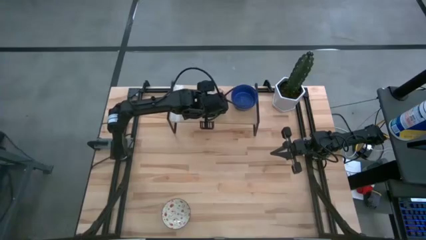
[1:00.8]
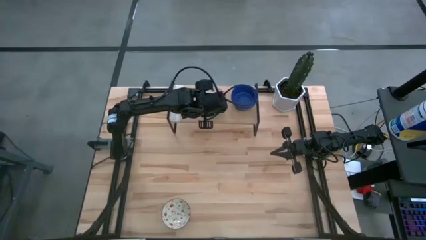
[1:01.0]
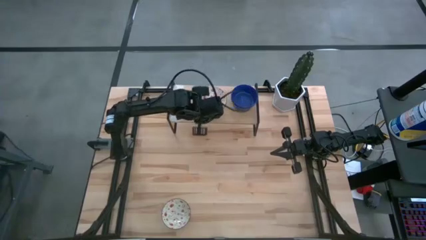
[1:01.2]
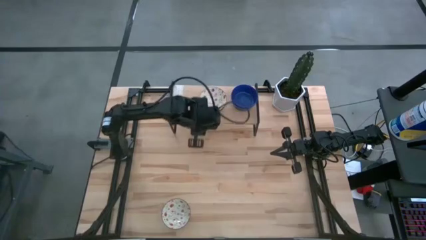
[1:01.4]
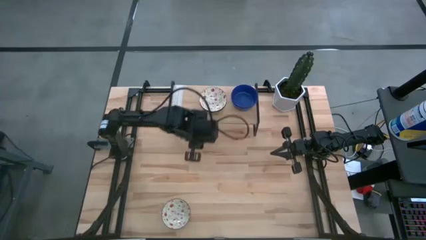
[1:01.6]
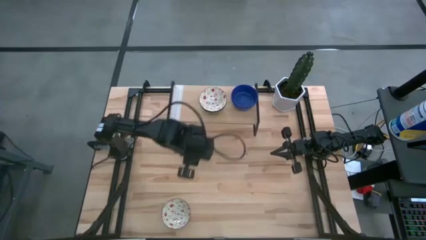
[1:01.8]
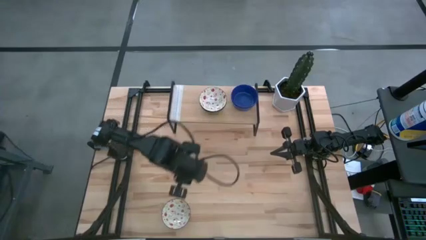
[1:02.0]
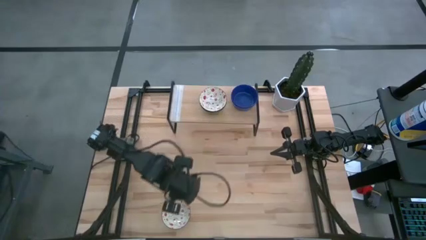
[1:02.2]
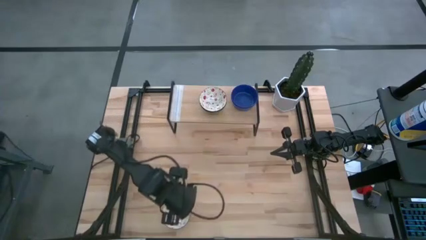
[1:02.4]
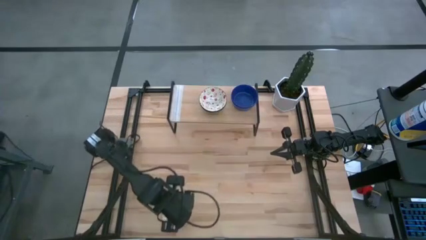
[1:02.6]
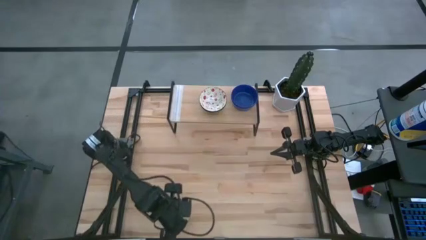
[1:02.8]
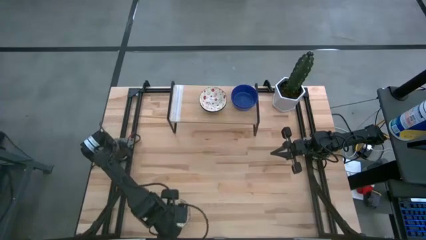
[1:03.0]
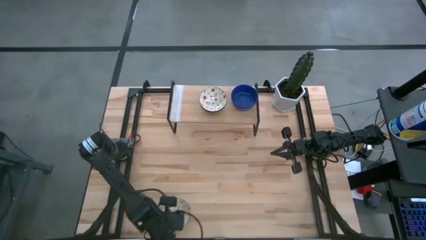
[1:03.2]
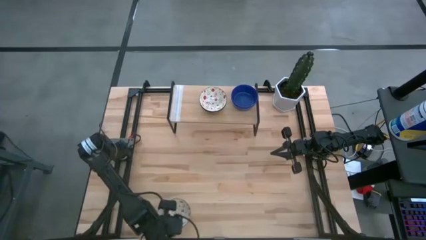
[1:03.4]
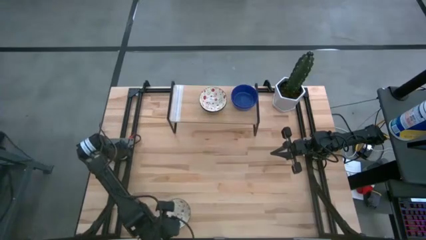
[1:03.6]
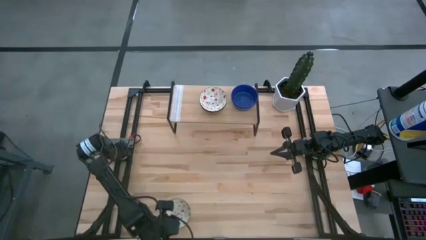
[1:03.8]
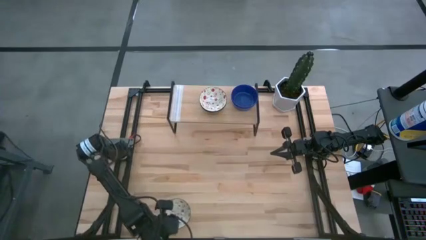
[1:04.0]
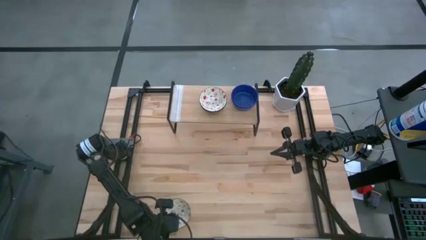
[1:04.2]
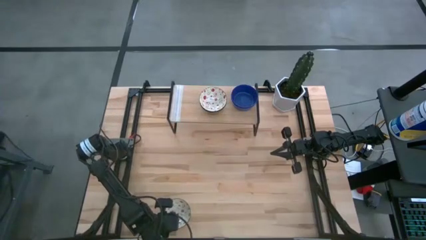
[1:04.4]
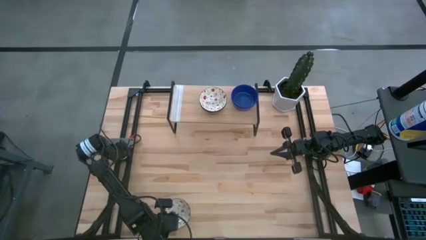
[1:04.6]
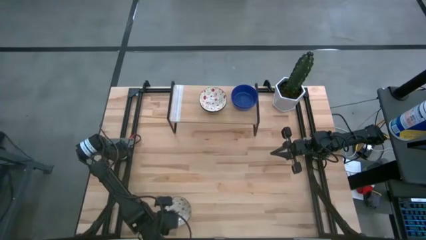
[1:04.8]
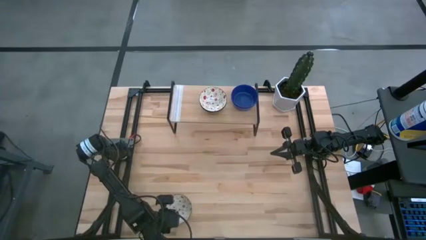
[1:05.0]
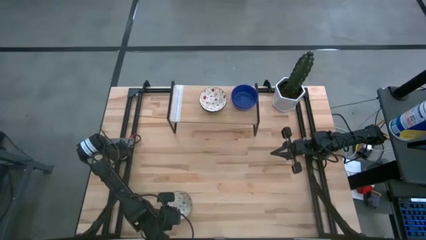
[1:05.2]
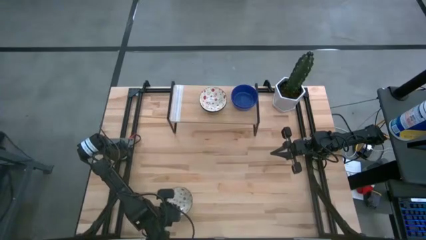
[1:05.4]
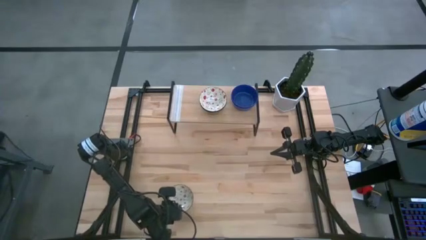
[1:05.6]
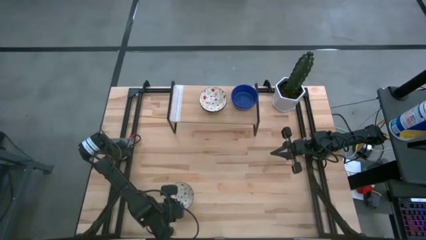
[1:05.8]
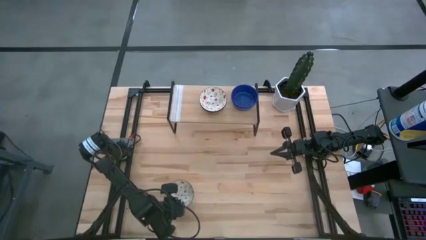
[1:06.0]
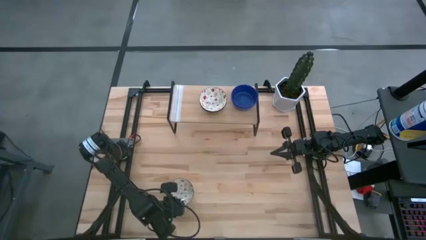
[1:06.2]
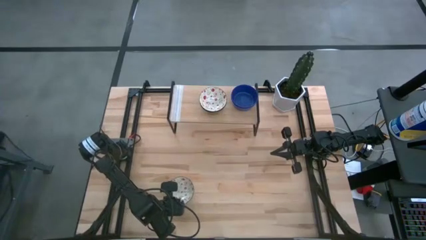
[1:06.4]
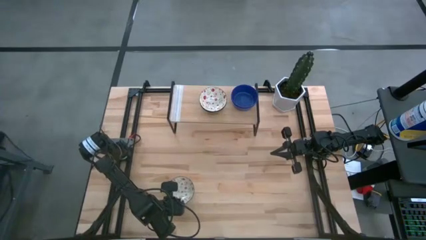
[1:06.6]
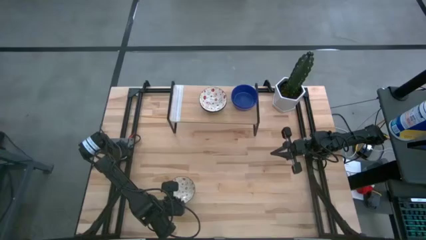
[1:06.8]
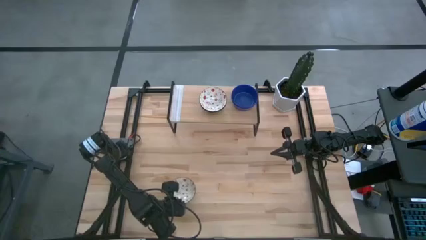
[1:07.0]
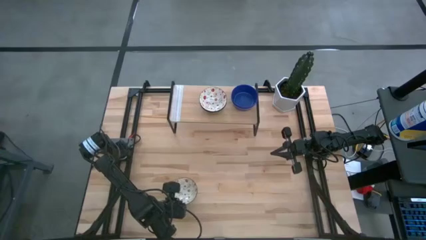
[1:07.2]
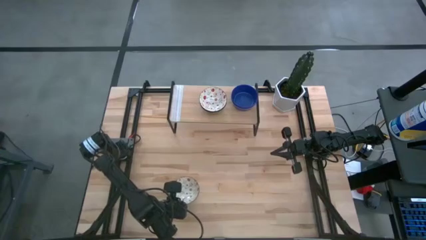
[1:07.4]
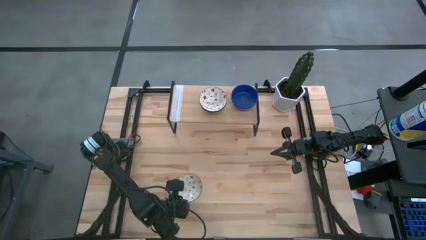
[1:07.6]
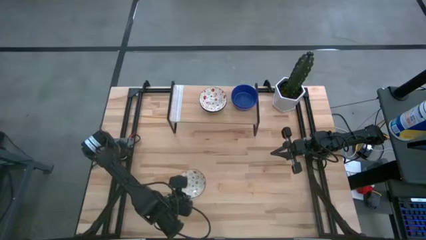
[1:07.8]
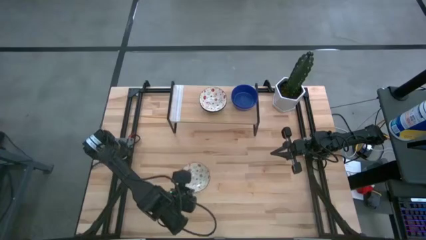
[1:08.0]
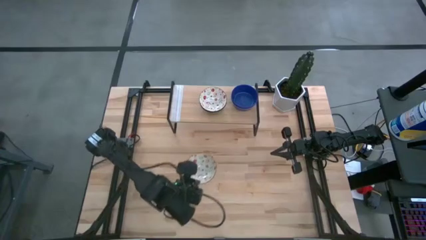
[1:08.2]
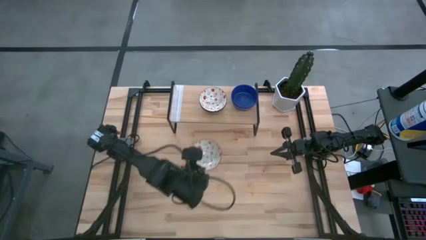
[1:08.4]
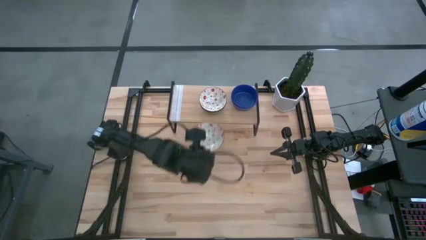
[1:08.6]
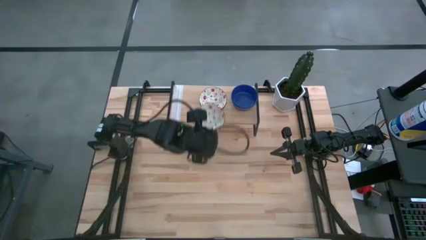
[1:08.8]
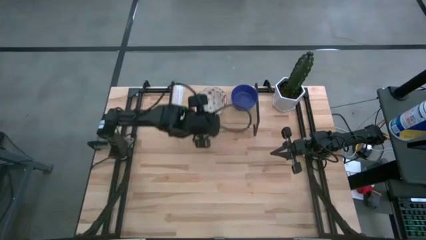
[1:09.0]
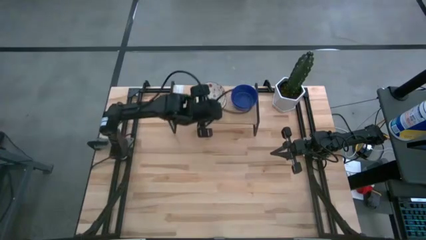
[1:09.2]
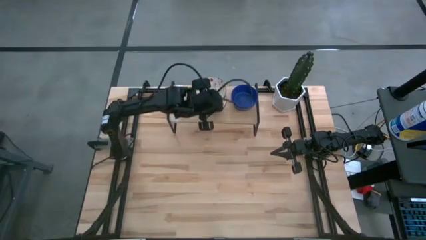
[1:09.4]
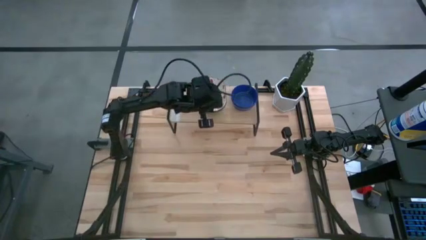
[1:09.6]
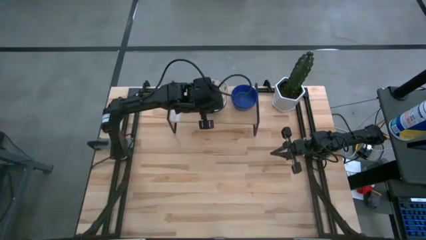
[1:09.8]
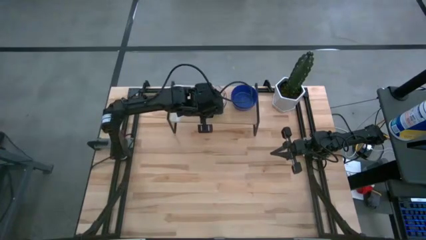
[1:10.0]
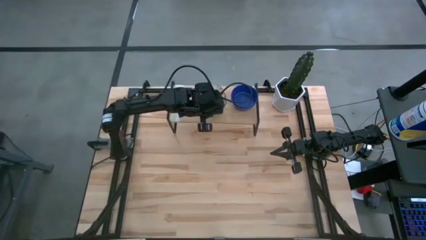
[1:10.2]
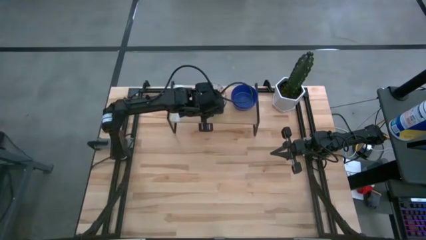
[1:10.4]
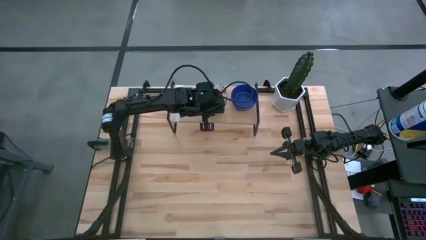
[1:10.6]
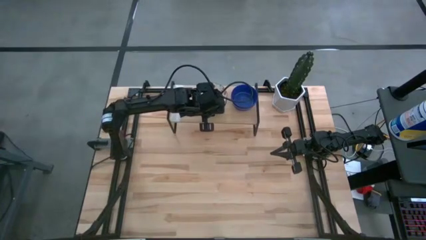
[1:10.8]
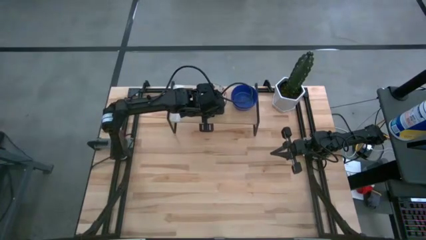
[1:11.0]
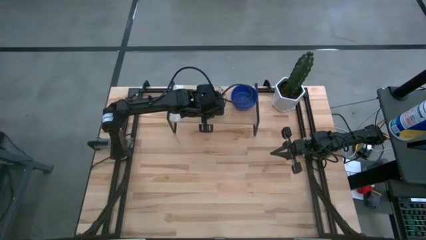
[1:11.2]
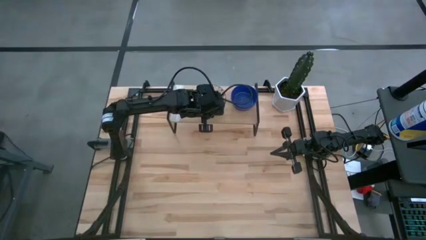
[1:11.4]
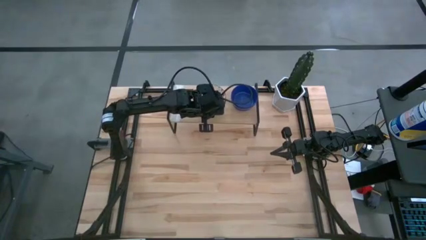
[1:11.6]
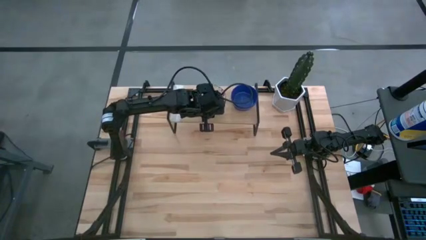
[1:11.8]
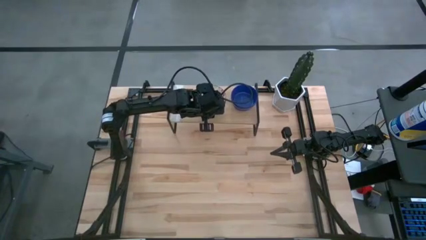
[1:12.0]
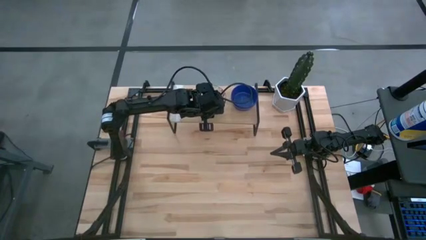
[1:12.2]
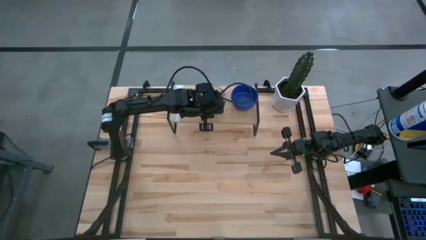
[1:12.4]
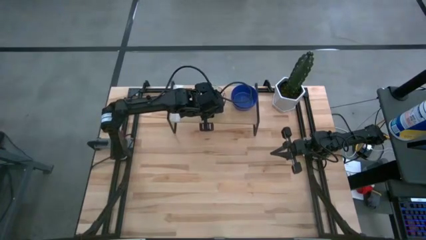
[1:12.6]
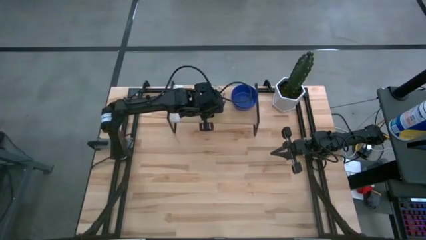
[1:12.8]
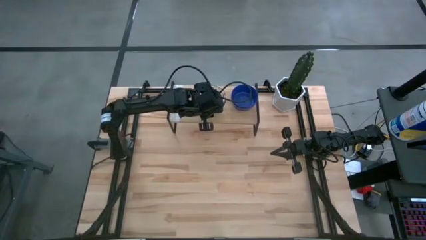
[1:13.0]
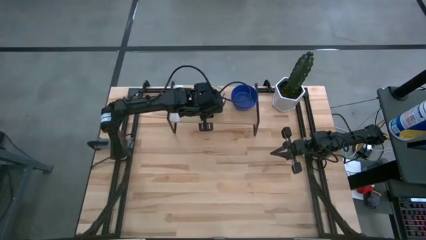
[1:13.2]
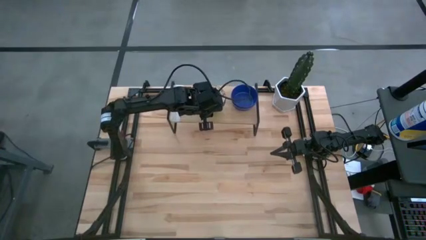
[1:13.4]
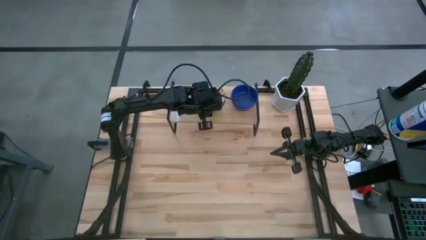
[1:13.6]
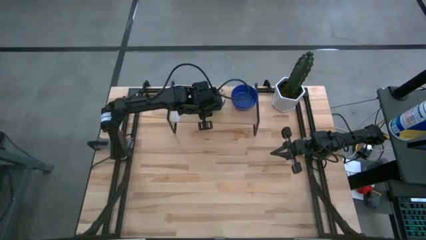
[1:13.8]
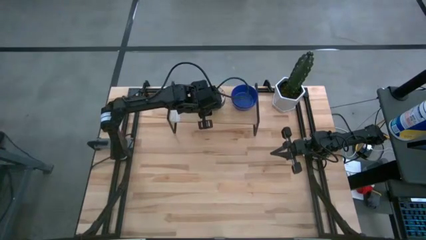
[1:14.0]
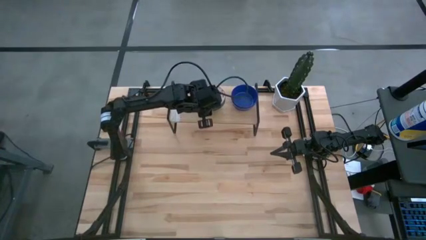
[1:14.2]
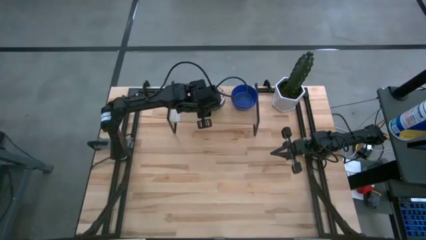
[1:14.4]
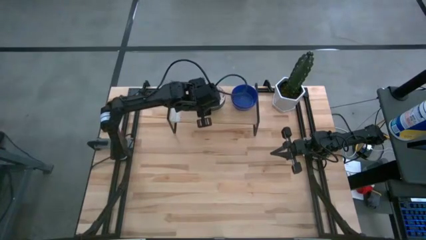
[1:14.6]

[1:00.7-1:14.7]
Task: Pick & Place Mini bowls
Stack the green patterned bowl on top of the other green patterned bowl on the shelf

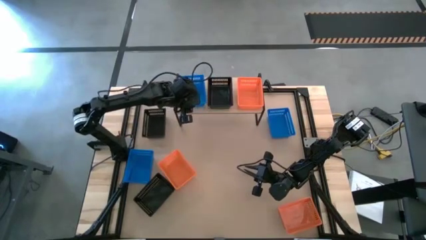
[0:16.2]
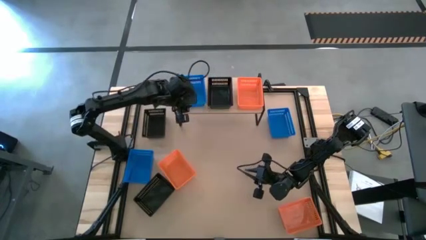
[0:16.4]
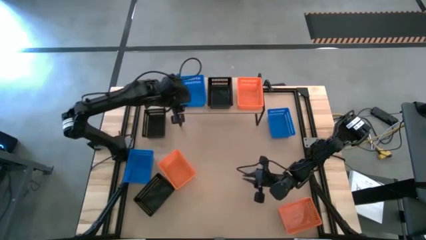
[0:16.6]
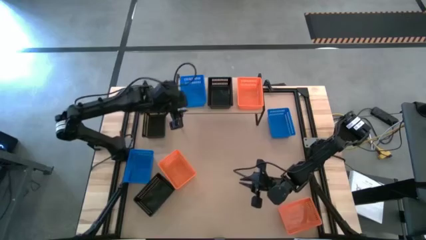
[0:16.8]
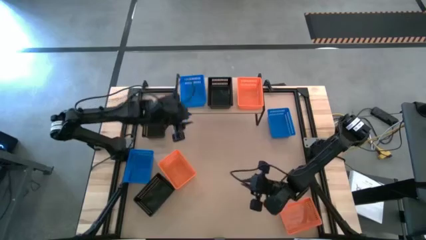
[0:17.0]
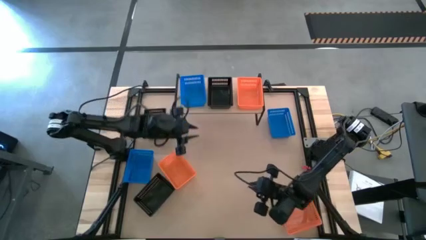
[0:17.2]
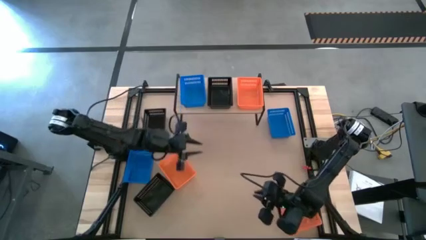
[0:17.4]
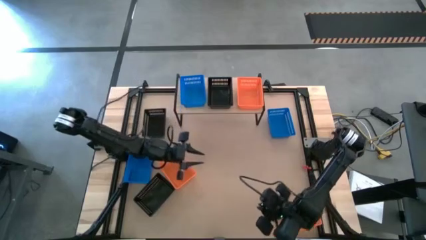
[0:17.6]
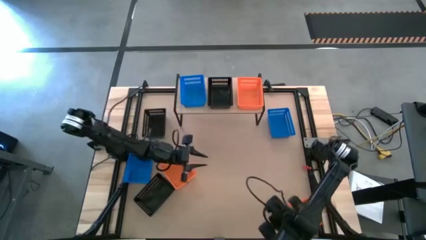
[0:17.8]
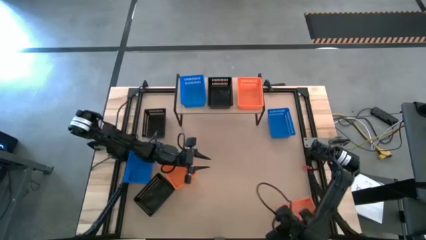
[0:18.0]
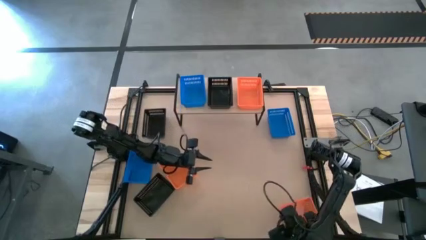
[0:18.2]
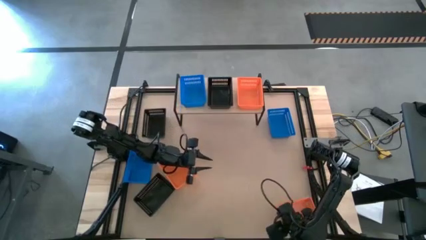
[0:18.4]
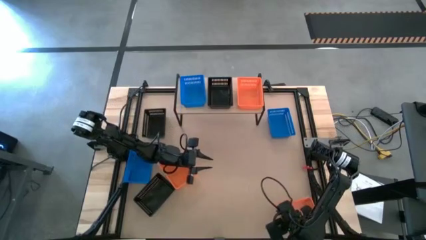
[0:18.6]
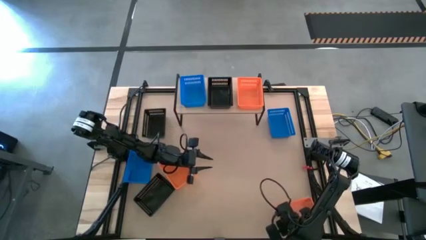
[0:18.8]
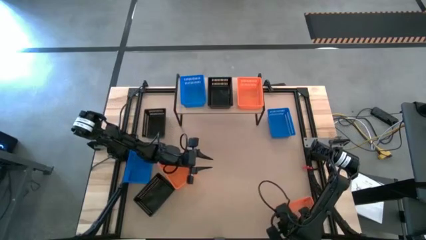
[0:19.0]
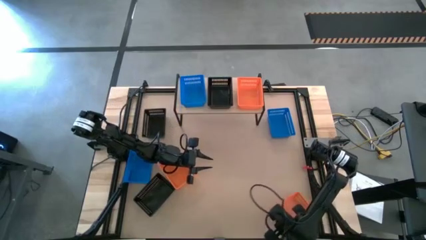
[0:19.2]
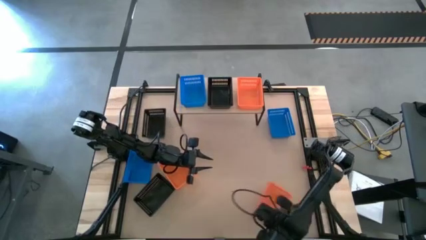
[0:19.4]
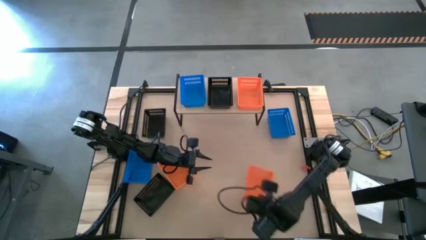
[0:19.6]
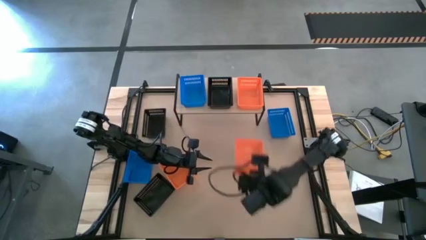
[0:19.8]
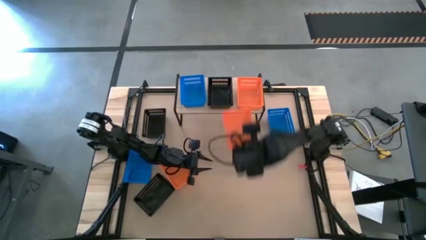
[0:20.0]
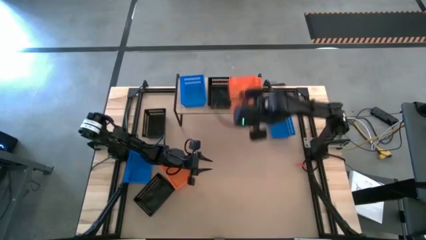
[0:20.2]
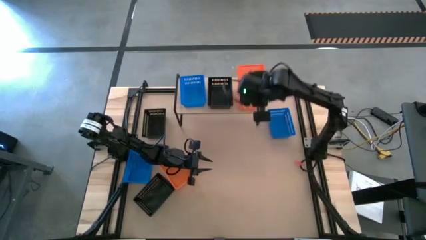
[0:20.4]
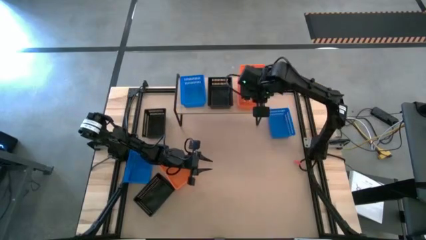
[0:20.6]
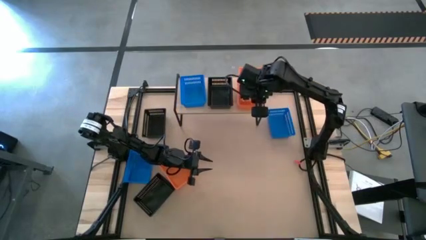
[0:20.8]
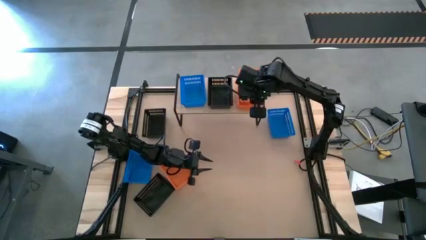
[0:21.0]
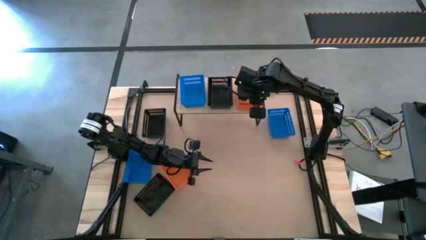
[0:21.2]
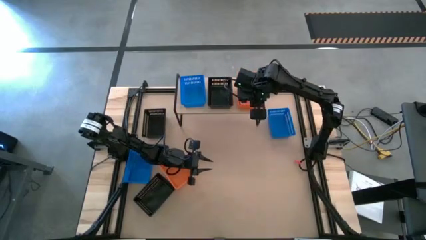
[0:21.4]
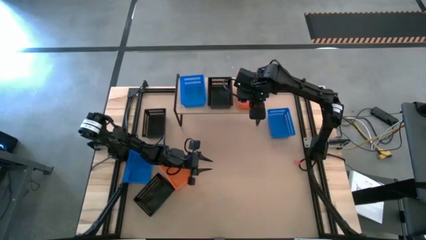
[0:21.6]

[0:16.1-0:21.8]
Task: Stack baskets on shelf by color
Stack the right orange bin on top of the orange bin on the shelf
